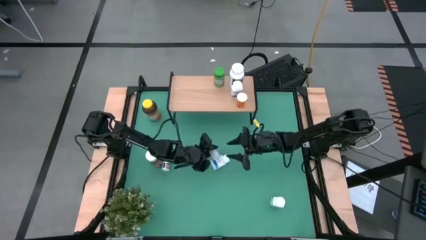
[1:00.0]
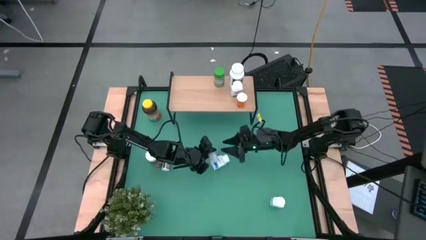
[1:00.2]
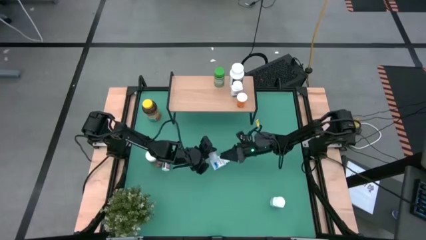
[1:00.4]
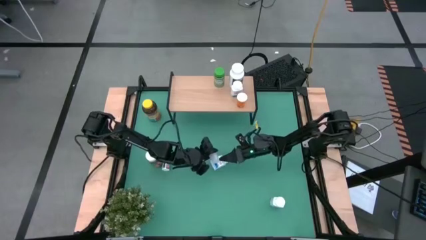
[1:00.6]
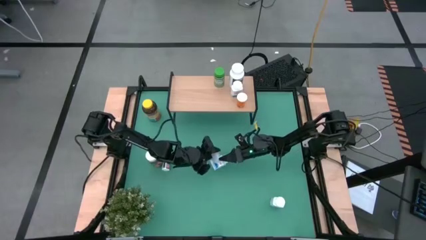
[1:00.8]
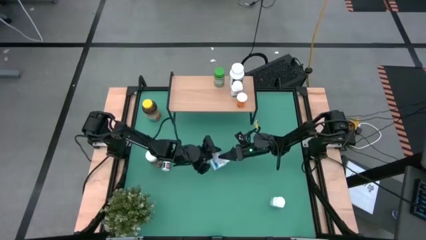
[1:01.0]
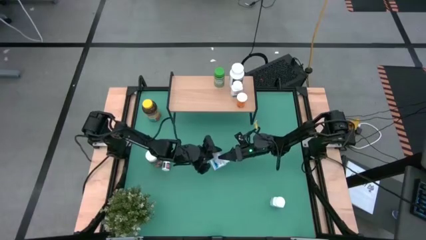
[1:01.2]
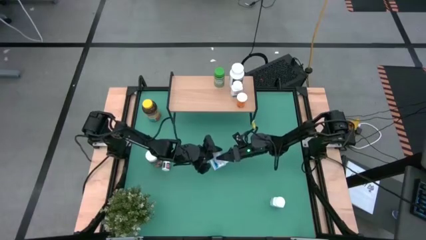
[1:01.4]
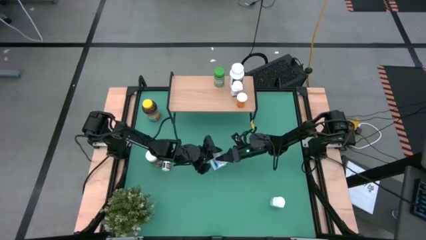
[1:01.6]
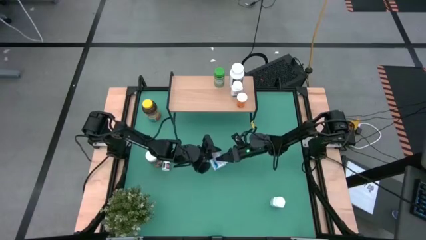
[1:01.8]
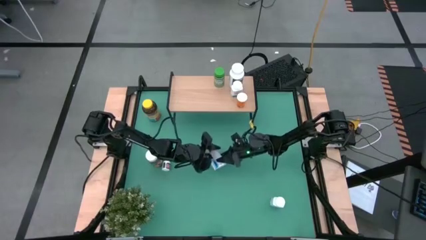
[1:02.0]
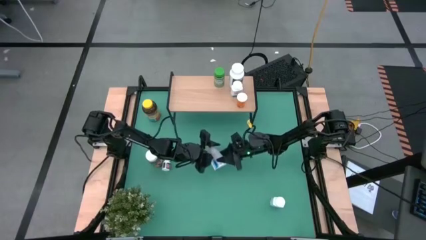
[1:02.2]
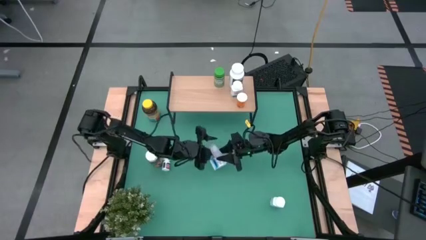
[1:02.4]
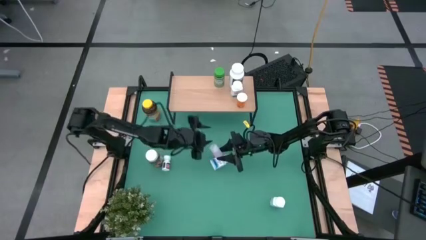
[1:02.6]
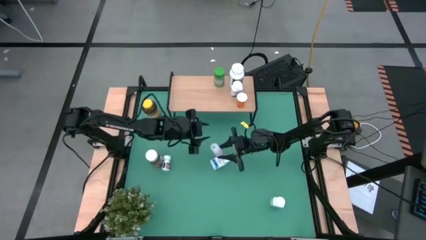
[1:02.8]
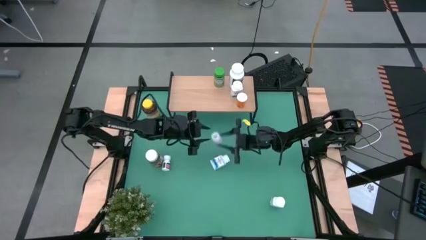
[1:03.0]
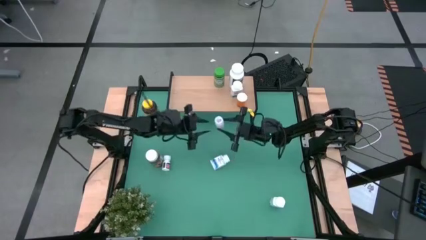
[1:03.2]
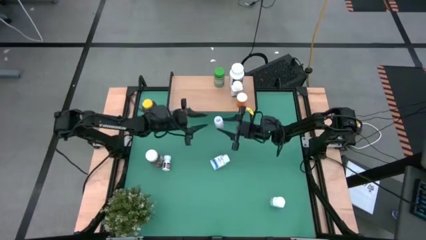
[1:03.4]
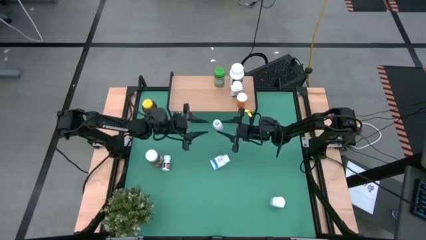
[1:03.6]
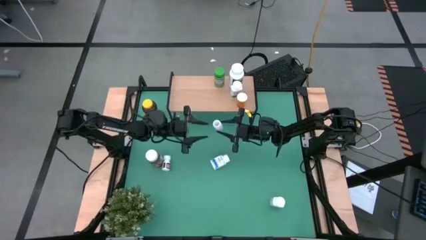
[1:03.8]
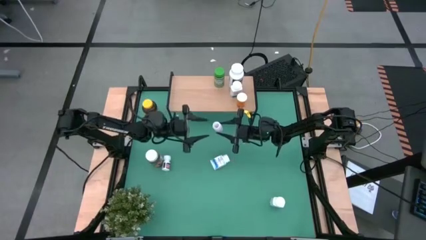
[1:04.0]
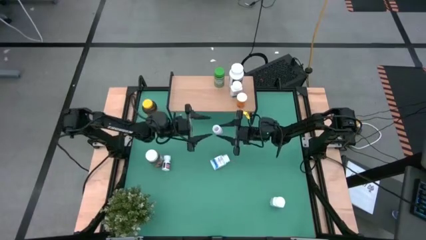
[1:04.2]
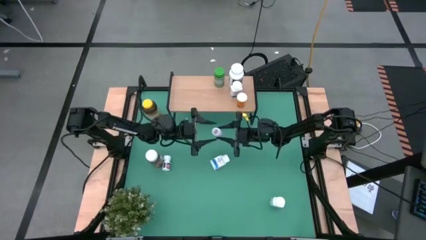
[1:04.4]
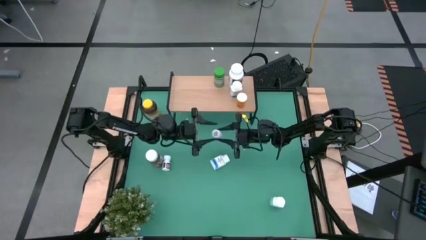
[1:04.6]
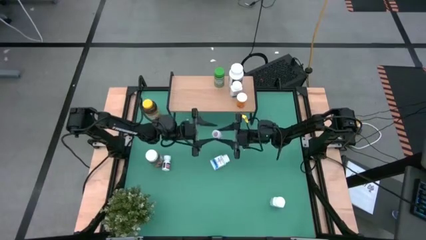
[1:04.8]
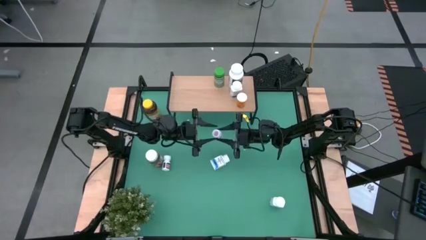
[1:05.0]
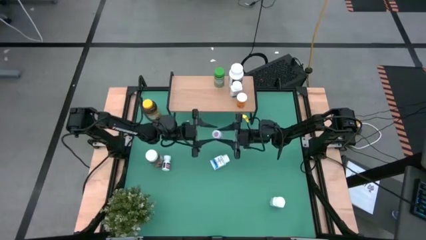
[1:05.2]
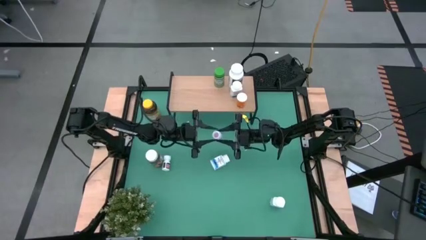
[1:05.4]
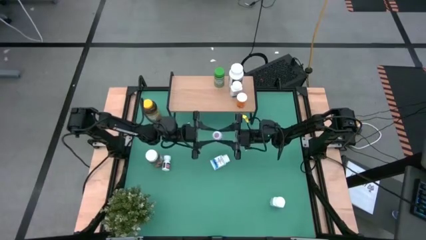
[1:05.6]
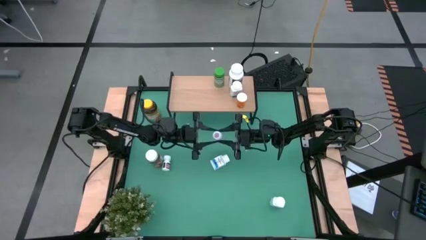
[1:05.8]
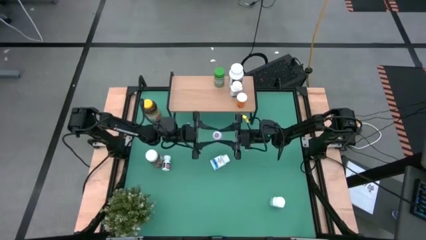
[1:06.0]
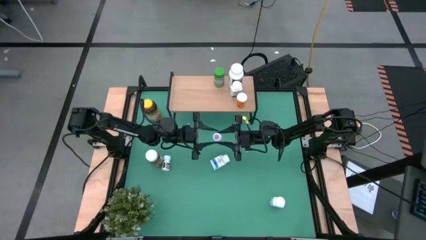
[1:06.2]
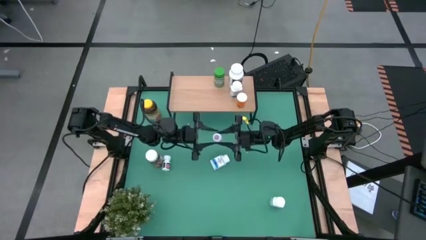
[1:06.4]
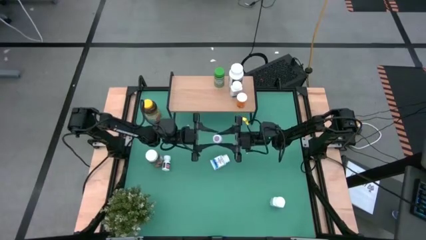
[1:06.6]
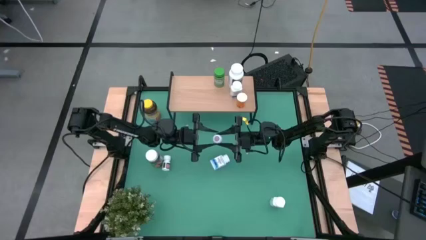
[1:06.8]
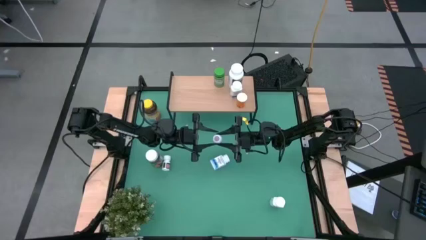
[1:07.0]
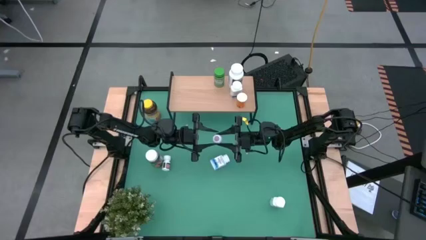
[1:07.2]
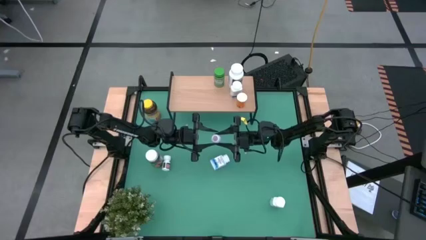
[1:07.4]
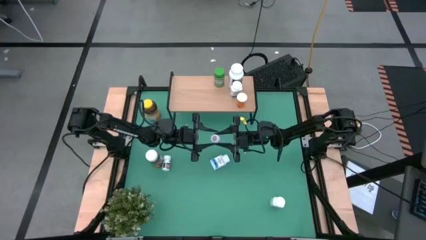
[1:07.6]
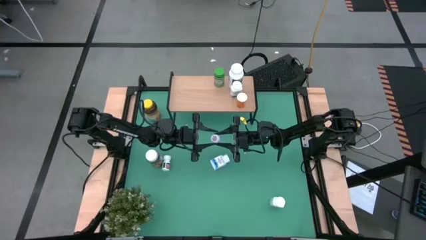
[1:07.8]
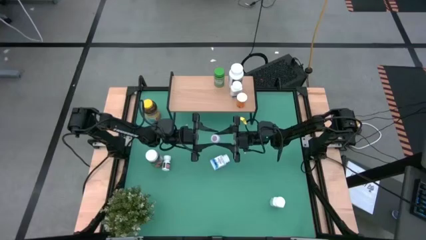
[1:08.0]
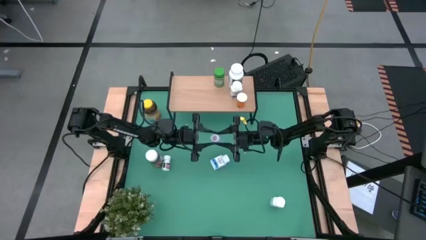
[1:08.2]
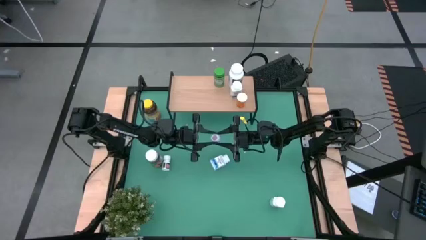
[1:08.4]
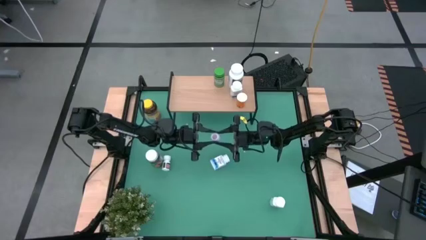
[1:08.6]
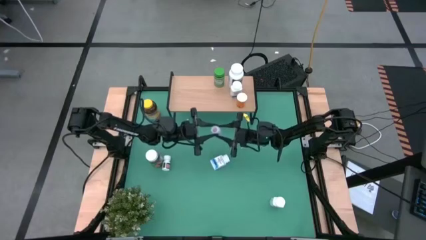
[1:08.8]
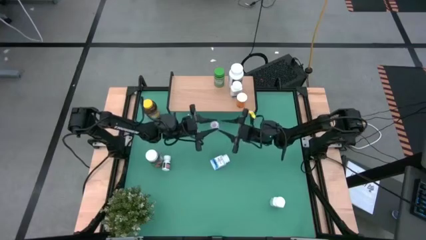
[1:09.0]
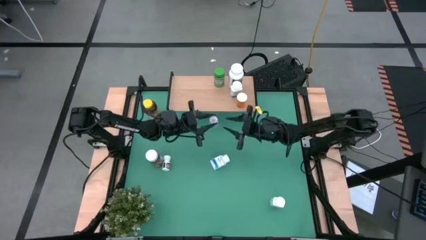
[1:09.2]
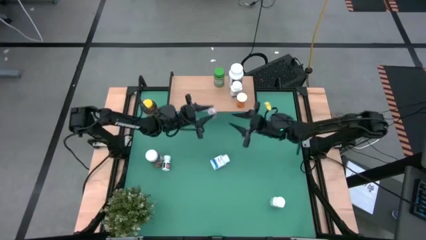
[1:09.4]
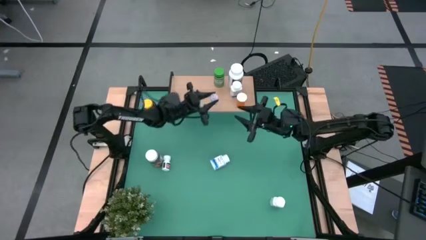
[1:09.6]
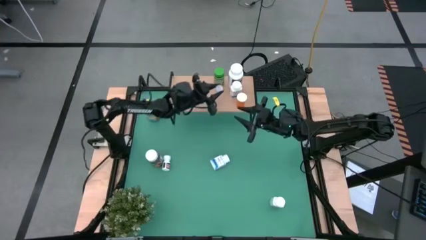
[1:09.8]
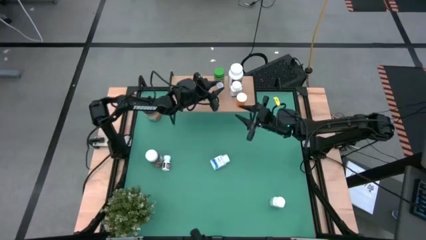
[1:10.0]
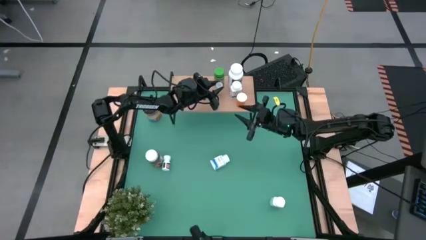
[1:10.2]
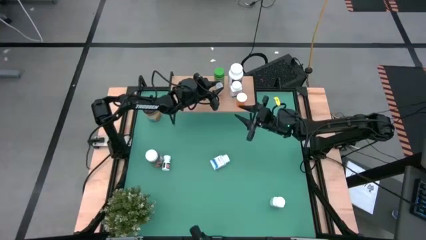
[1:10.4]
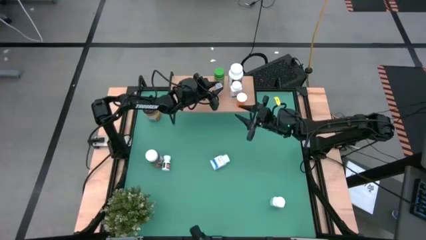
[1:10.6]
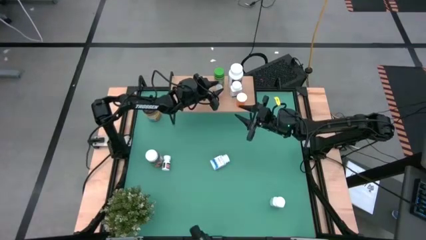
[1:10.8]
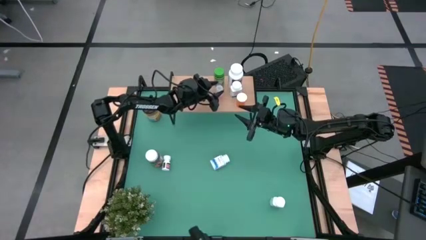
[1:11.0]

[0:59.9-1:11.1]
Task: Pick and place medicine bottles onto shelf by color
Put the transparent pill bottle on the shelf
